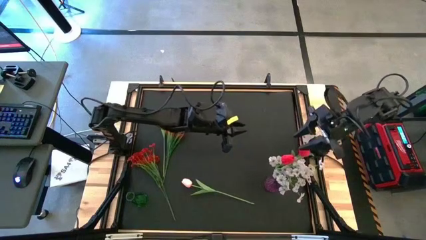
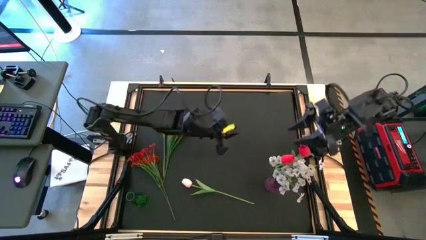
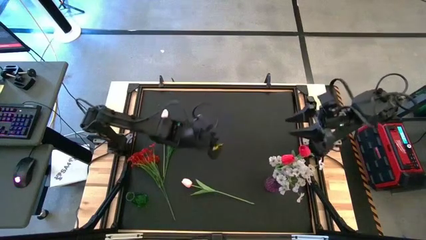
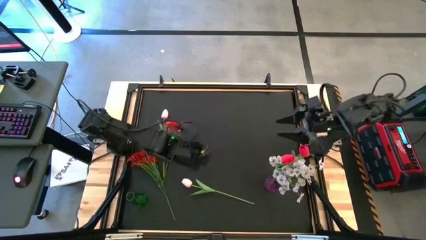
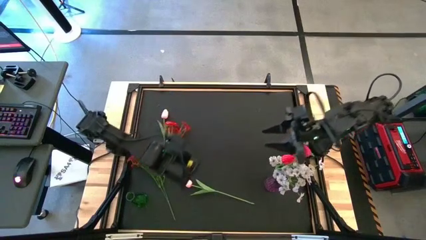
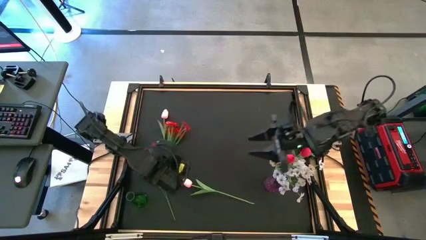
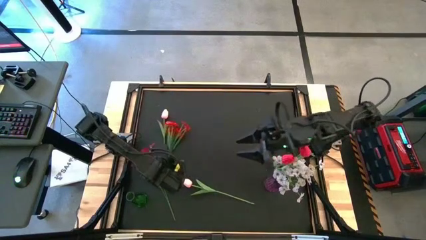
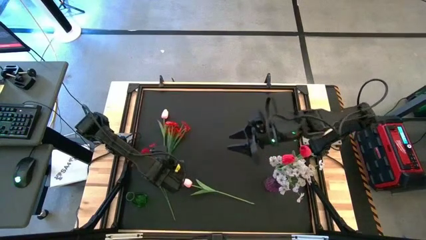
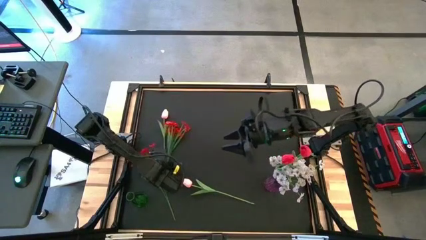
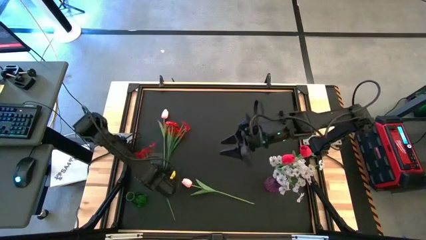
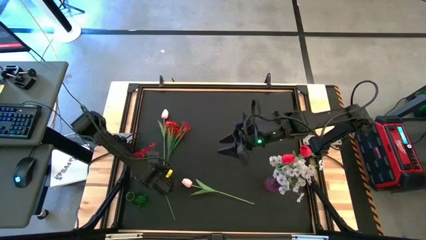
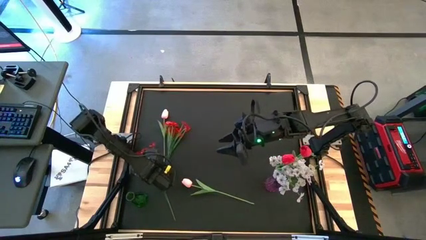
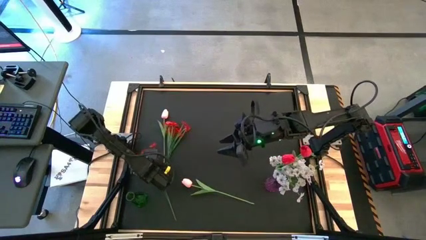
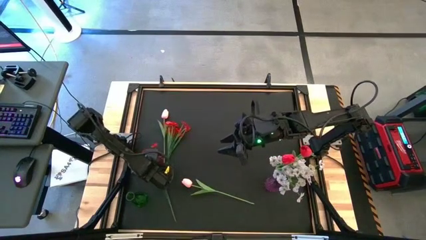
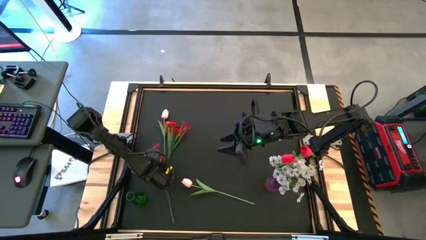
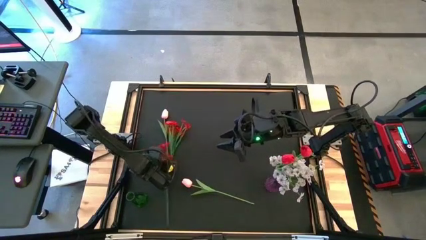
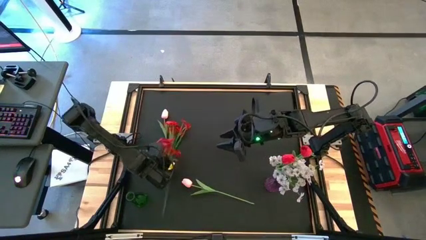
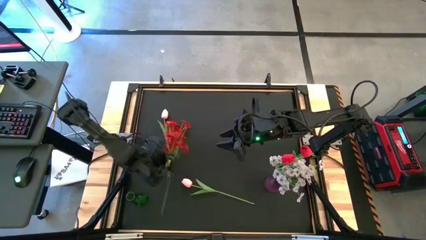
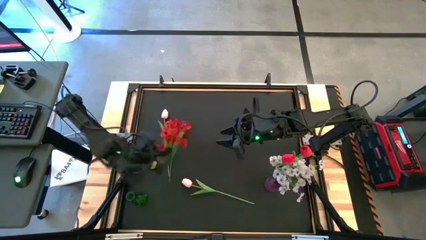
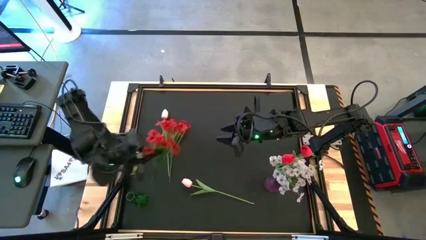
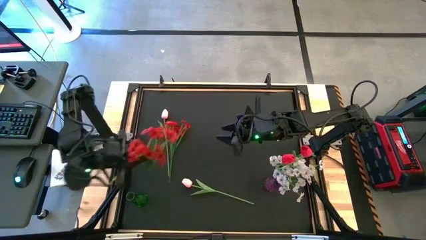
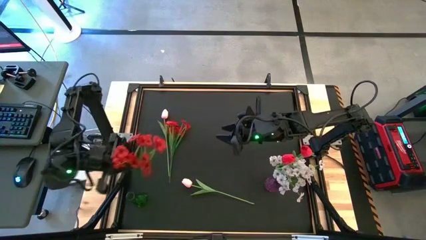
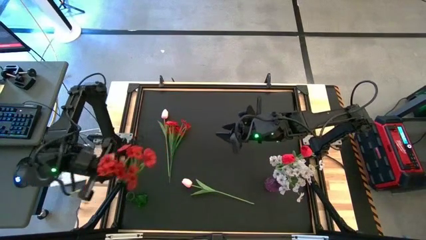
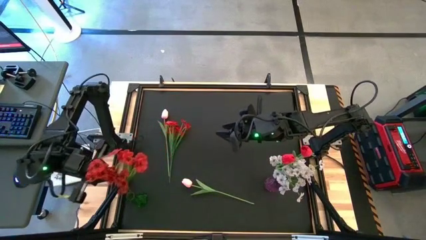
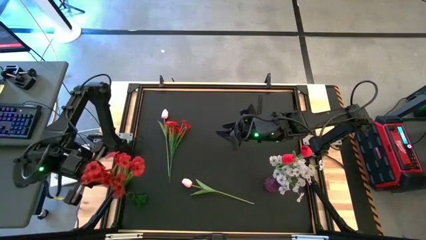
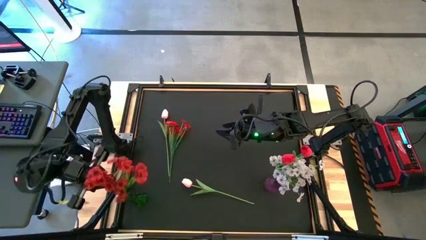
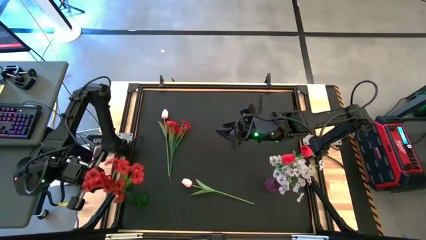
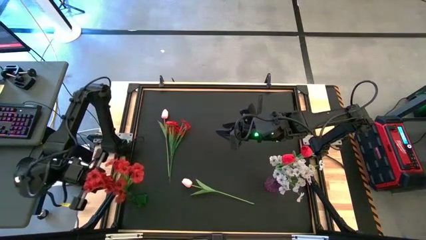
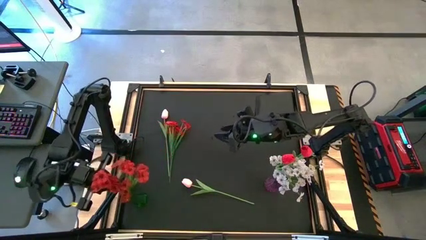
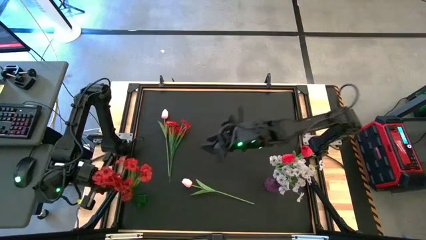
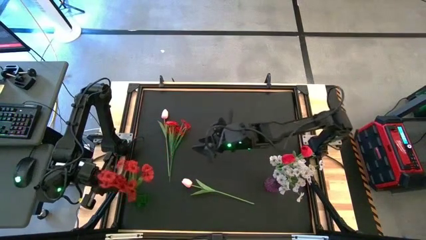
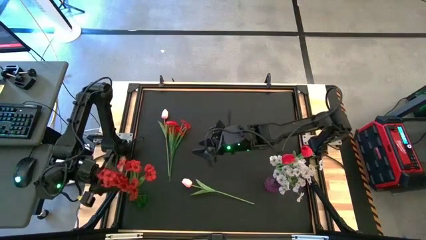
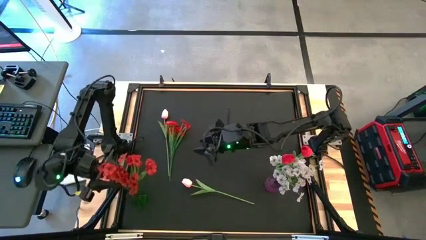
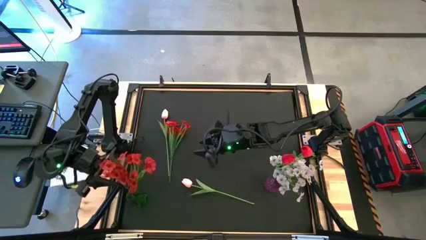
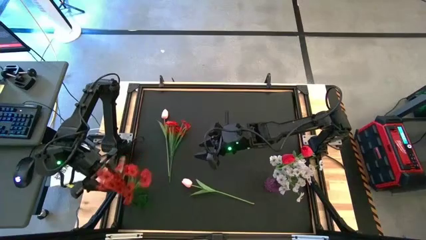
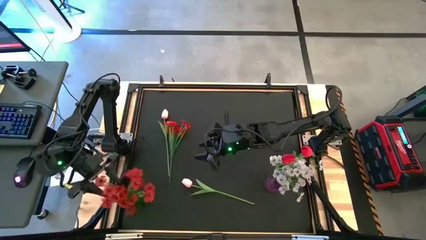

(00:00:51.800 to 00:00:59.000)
Task: Sort flowers into vase by color
Put the bottom red flower into the green vase

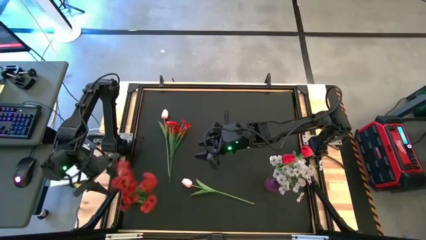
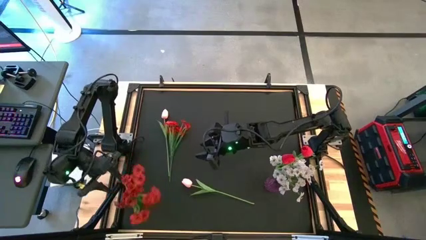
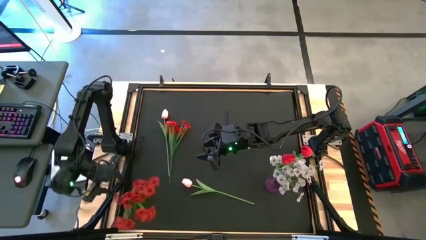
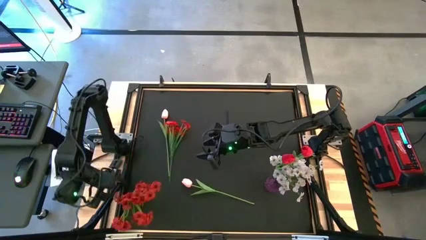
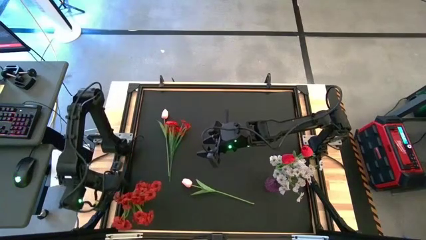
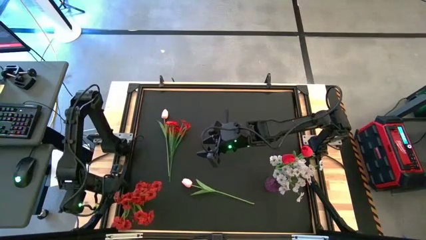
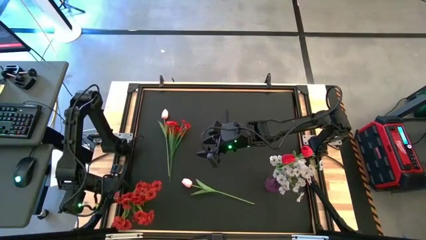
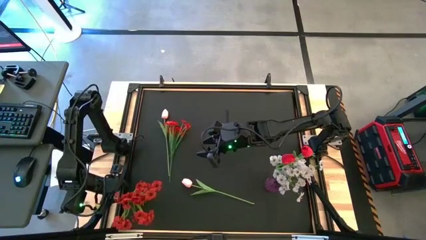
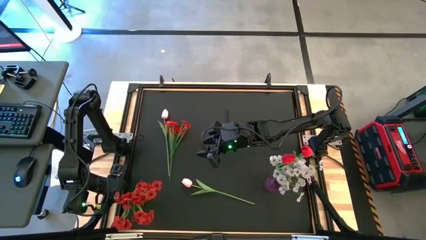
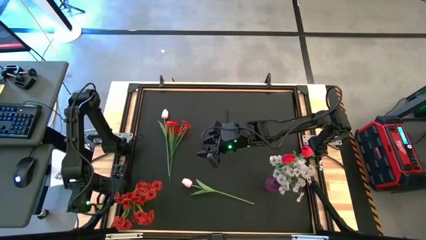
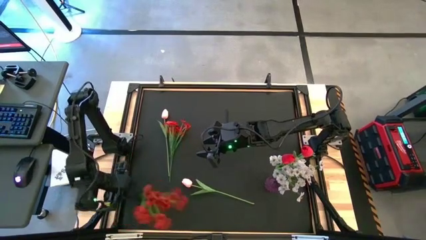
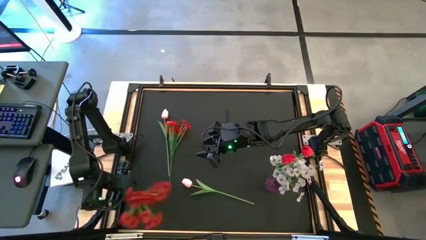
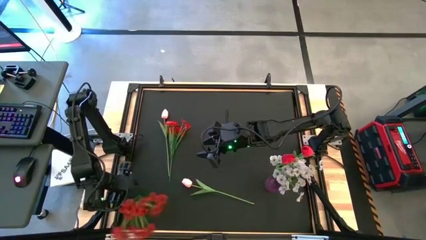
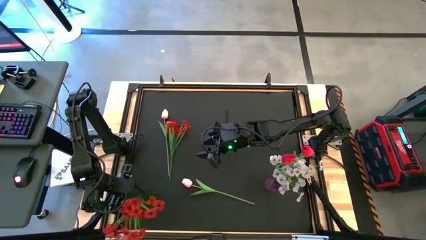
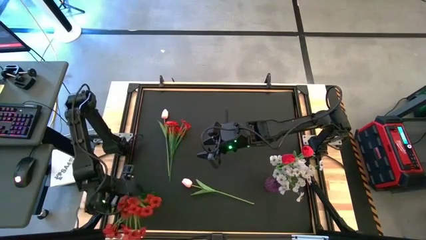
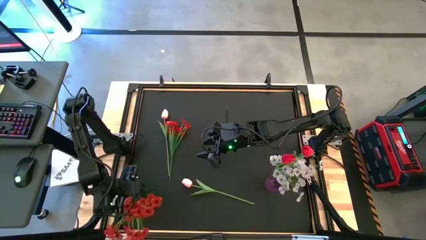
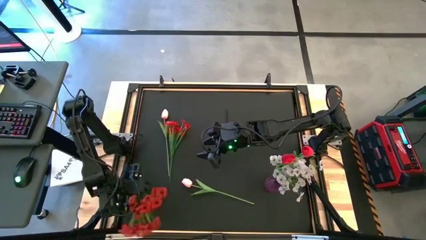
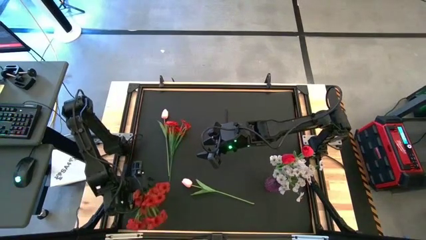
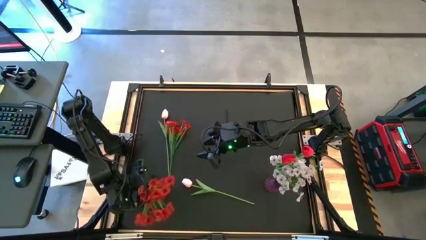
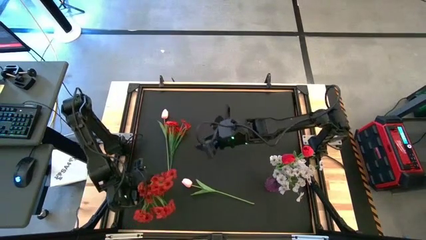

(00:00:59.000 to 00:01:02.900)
Adjust the green vase

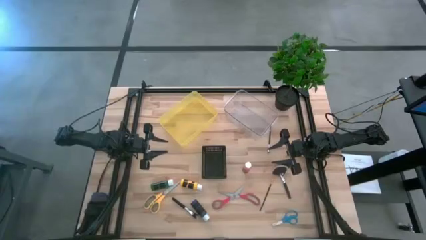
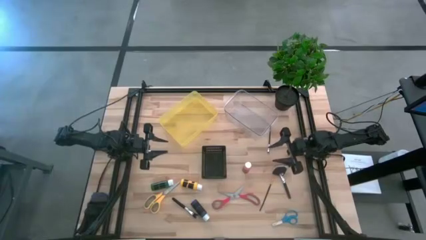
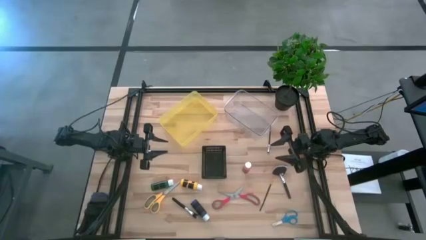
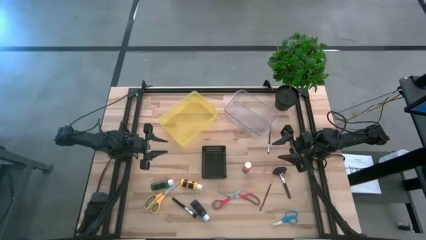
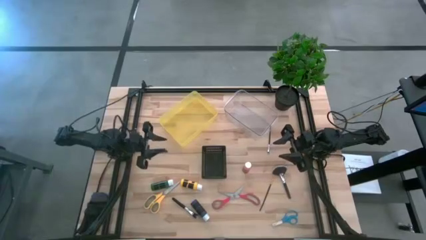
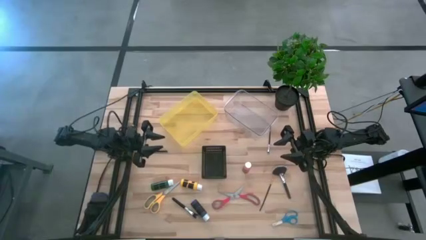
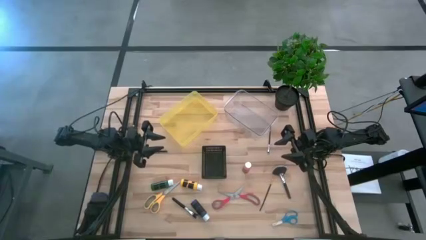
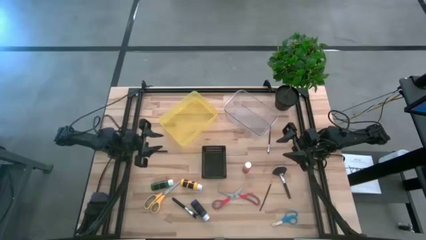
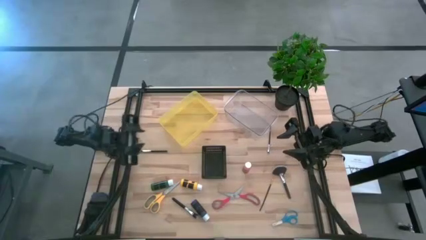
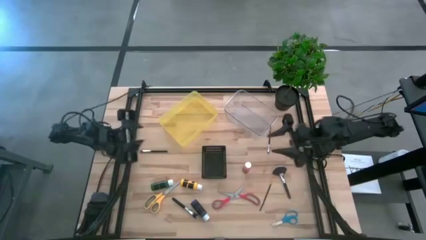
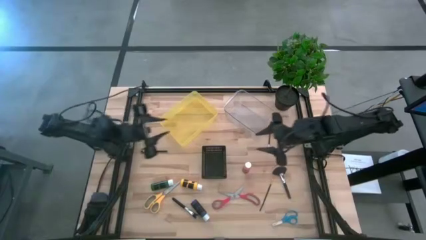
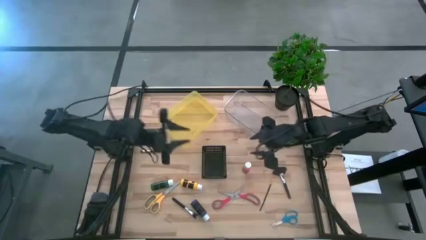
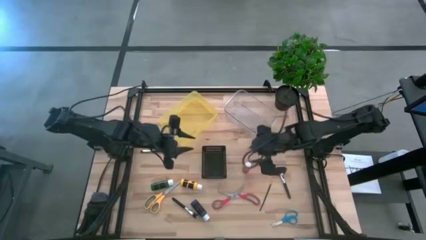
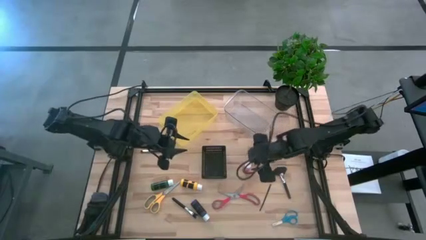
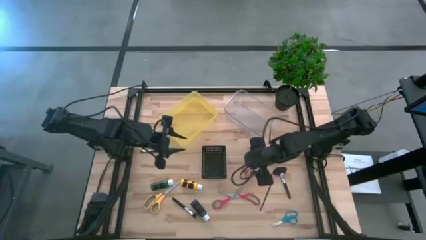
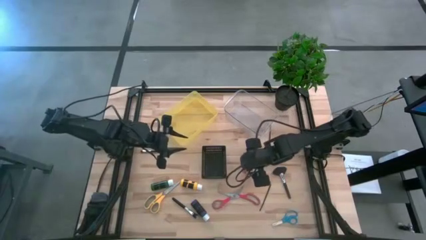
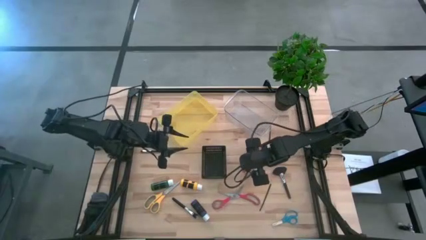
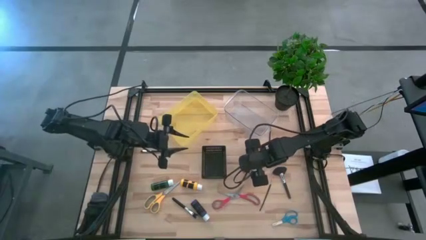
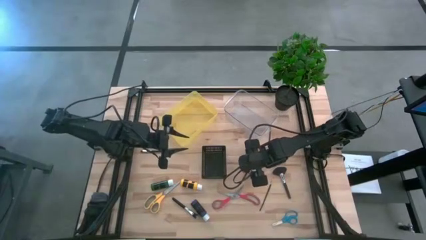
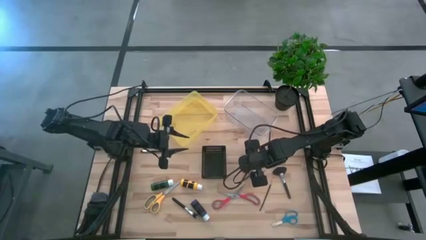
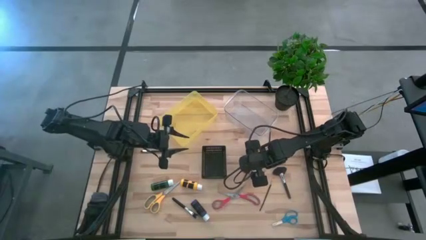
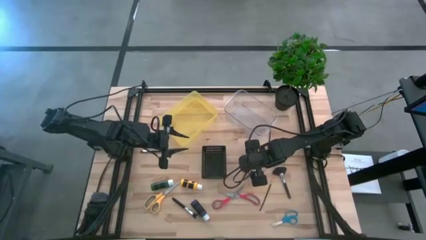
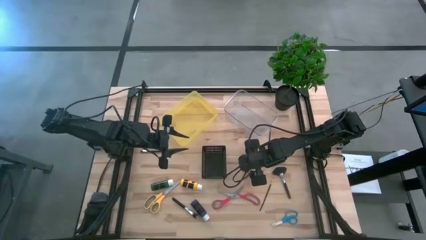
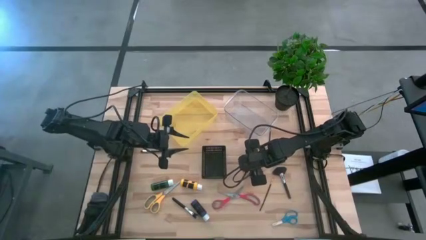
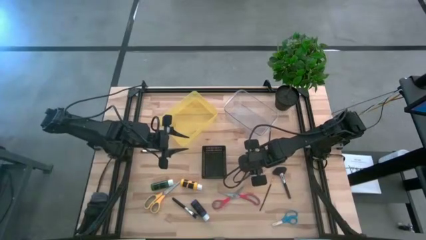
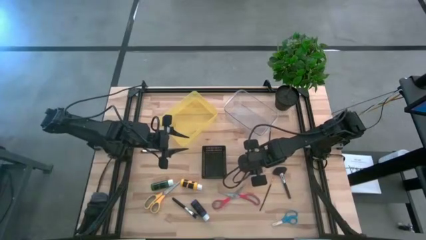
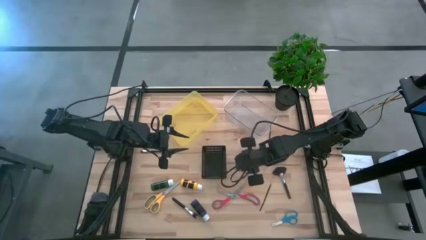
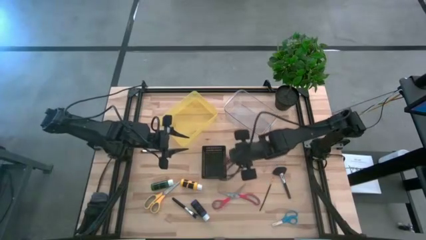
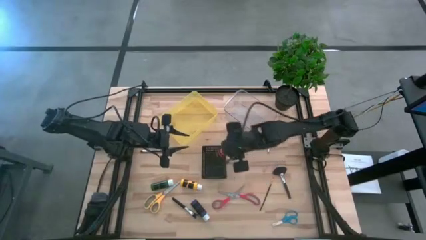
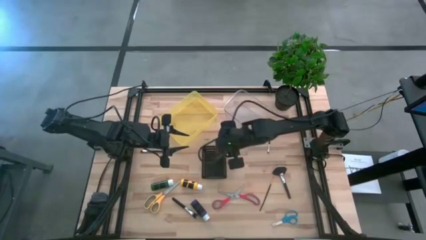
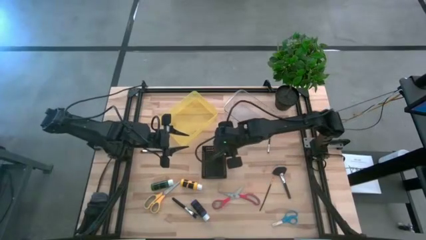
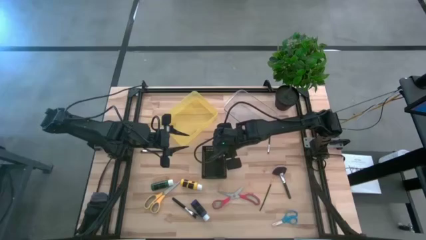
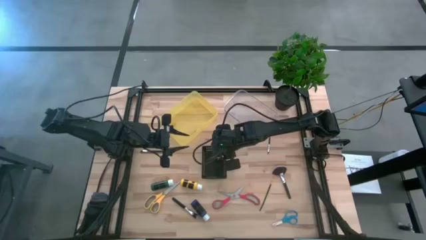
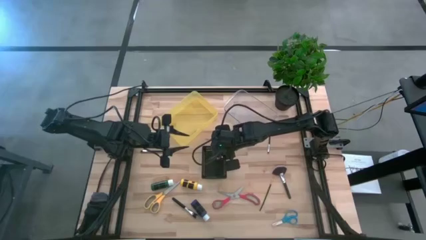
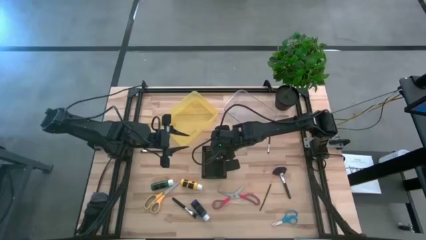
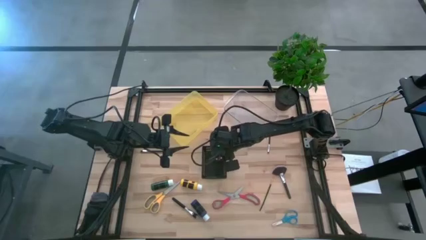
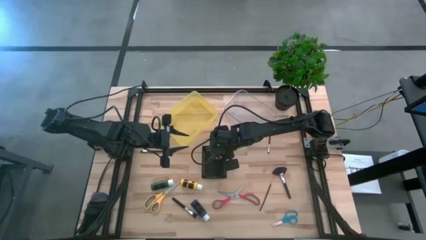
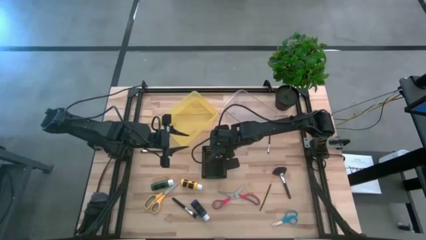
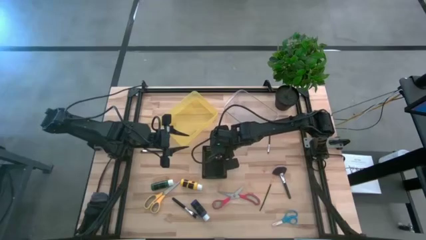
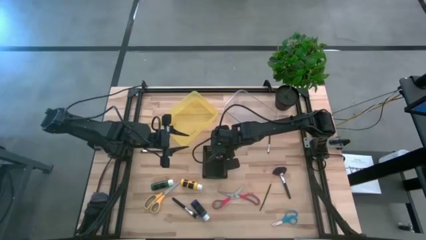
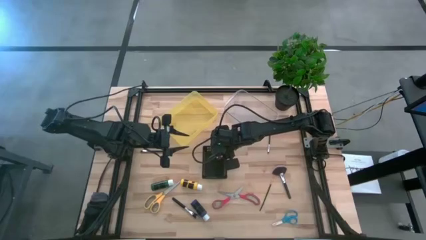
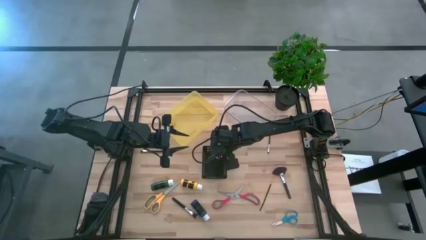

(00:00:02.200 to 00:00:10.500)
Task: Pick & Place Paint Supplies
Put the orange paint bottle into the black bin
